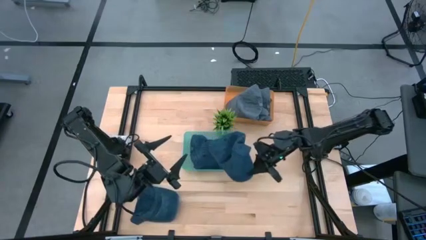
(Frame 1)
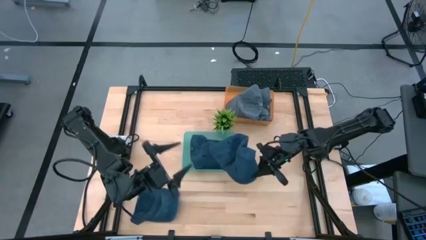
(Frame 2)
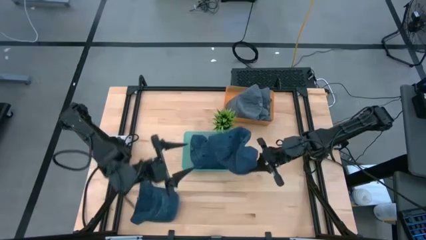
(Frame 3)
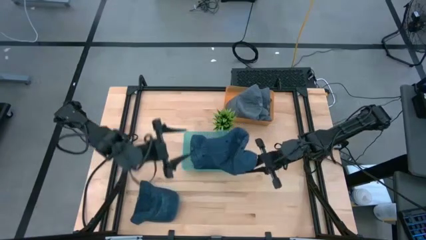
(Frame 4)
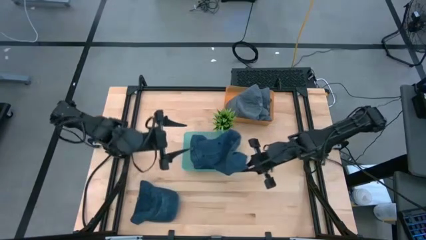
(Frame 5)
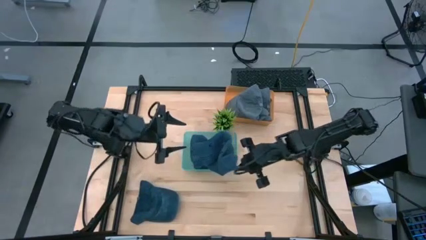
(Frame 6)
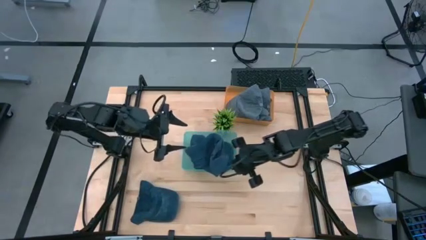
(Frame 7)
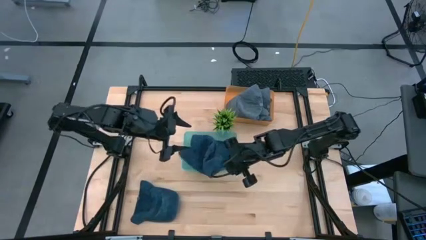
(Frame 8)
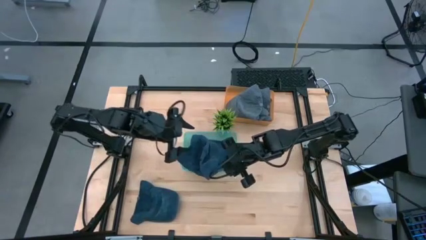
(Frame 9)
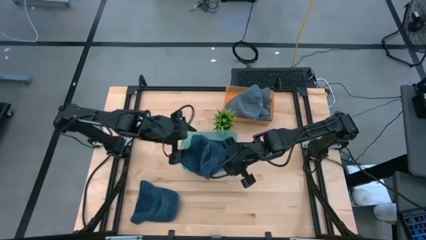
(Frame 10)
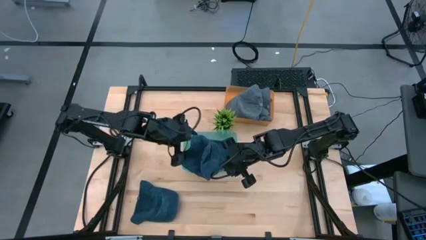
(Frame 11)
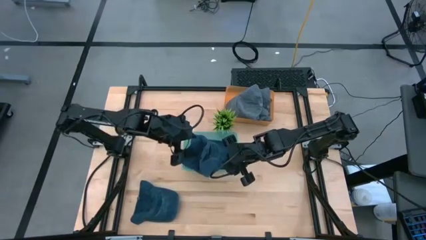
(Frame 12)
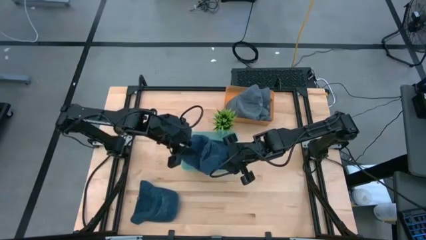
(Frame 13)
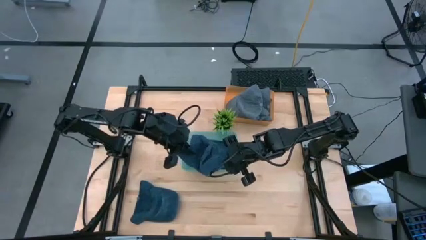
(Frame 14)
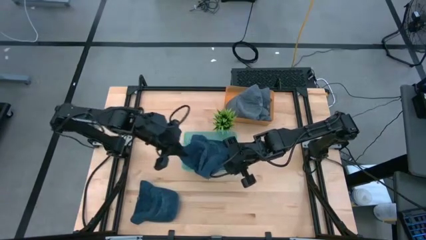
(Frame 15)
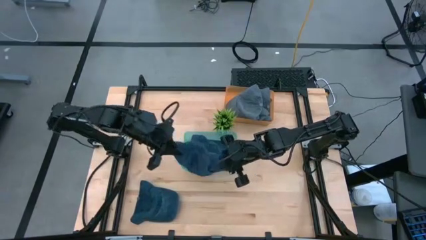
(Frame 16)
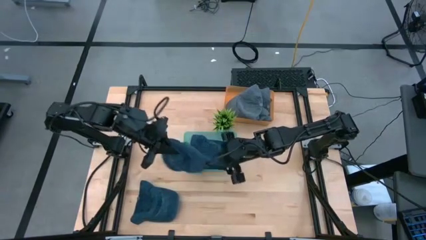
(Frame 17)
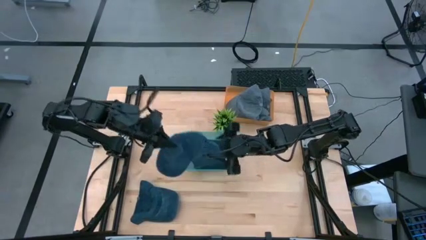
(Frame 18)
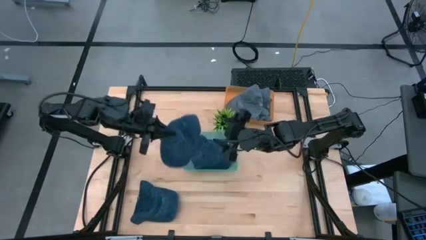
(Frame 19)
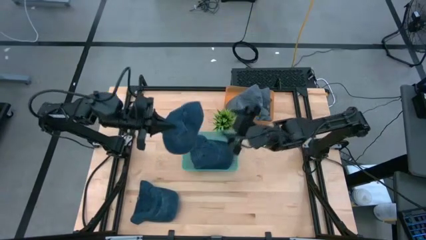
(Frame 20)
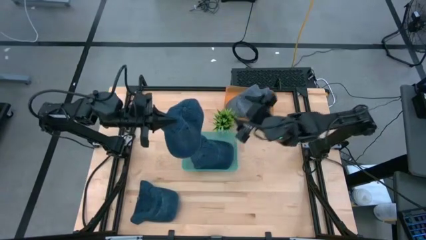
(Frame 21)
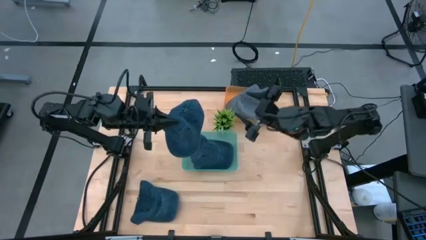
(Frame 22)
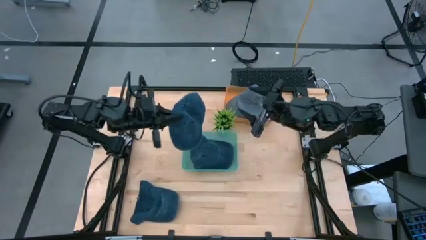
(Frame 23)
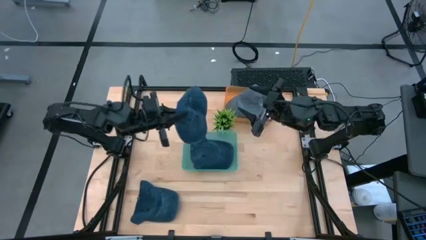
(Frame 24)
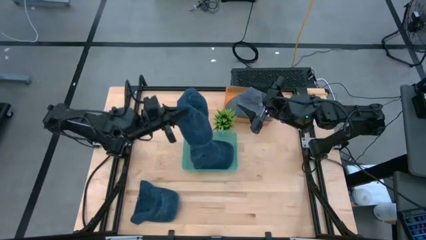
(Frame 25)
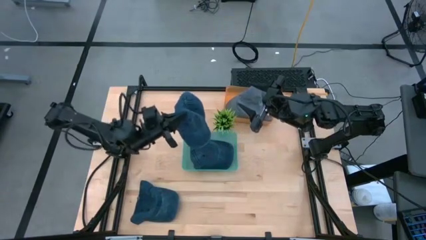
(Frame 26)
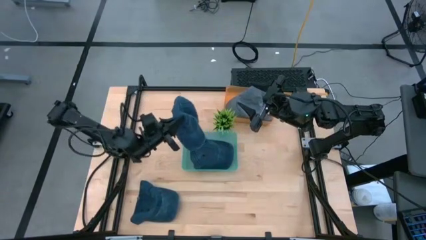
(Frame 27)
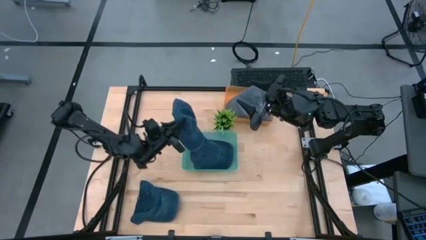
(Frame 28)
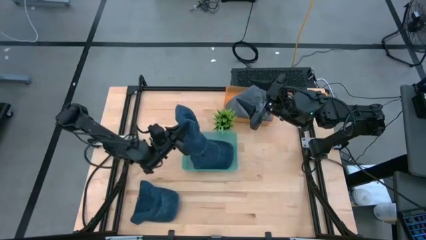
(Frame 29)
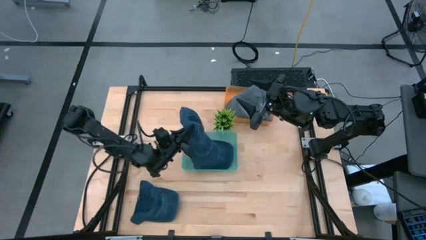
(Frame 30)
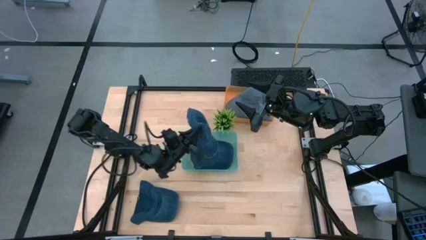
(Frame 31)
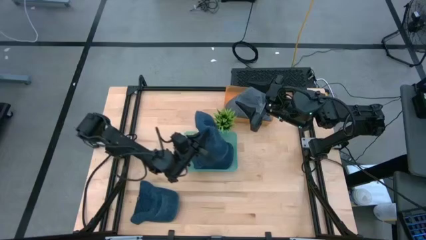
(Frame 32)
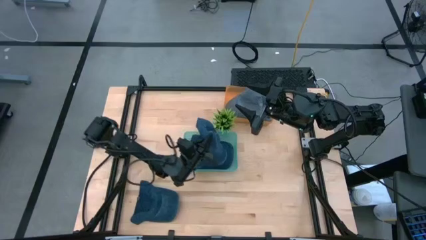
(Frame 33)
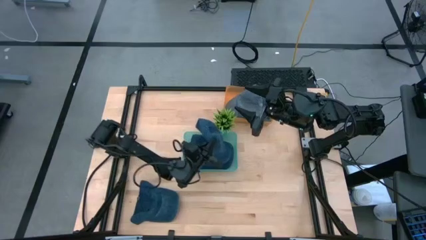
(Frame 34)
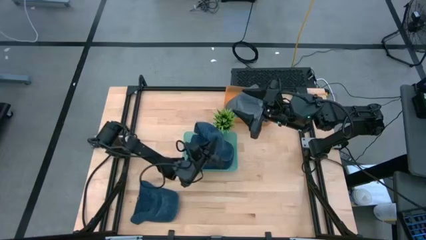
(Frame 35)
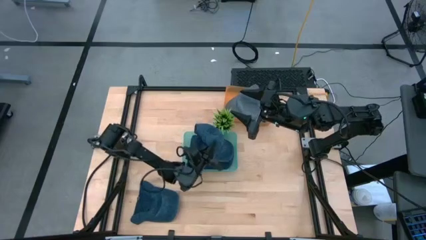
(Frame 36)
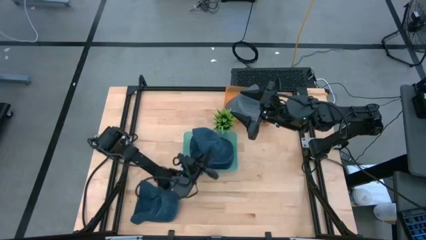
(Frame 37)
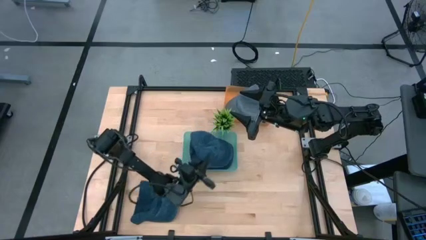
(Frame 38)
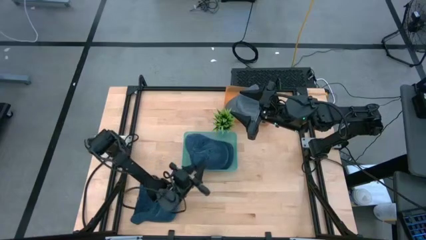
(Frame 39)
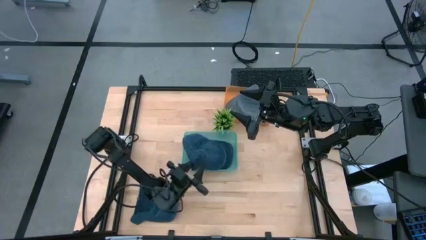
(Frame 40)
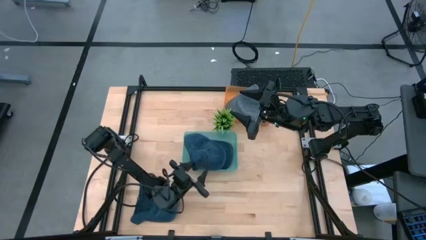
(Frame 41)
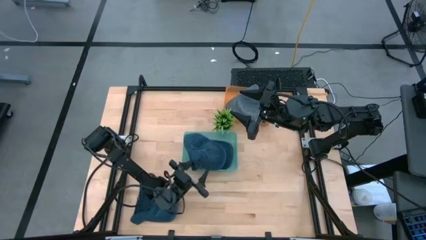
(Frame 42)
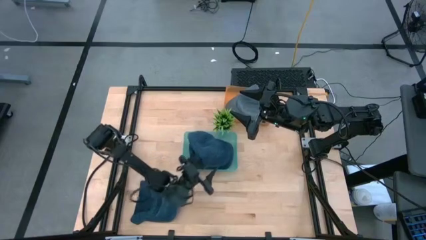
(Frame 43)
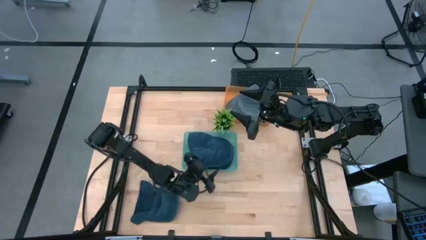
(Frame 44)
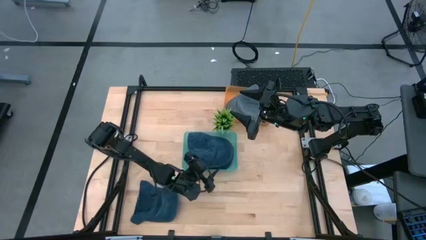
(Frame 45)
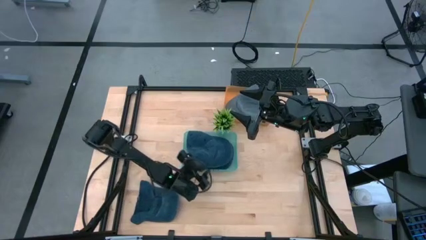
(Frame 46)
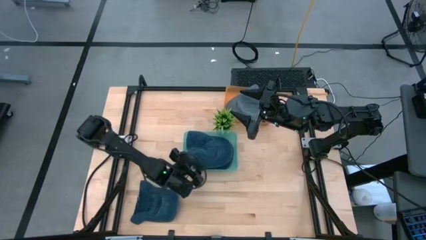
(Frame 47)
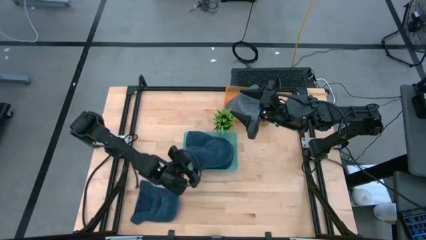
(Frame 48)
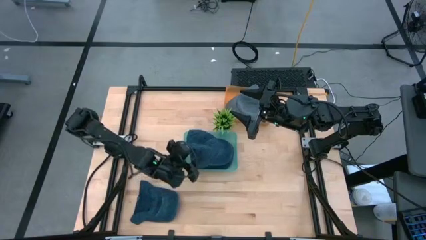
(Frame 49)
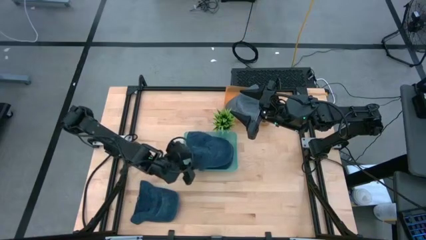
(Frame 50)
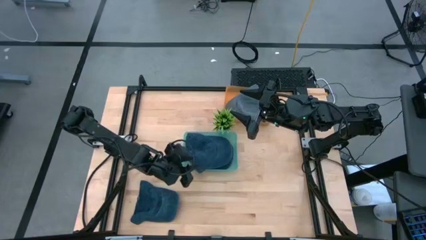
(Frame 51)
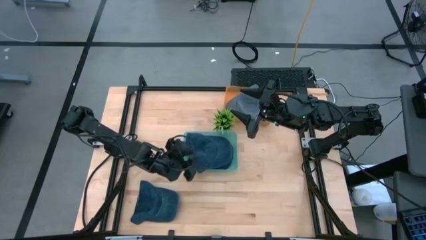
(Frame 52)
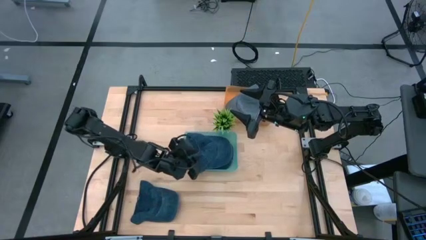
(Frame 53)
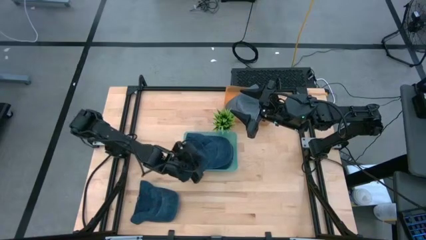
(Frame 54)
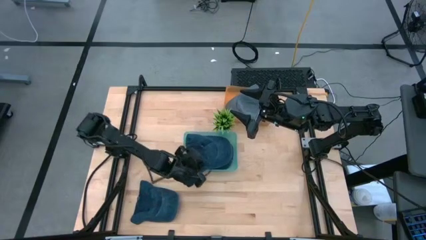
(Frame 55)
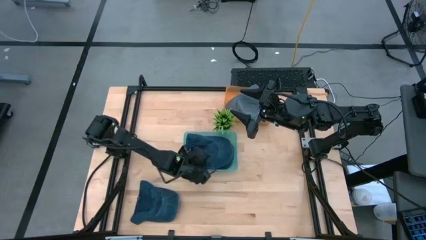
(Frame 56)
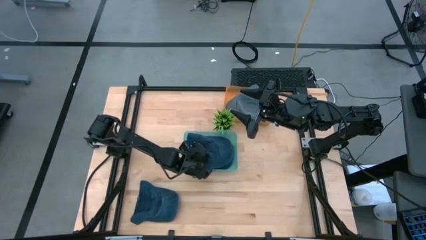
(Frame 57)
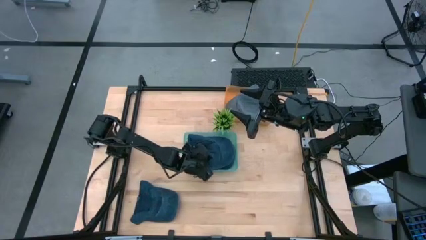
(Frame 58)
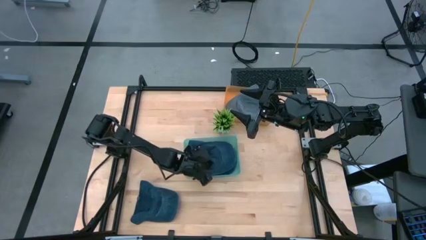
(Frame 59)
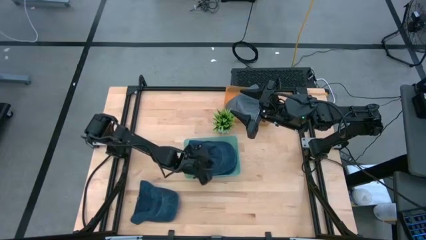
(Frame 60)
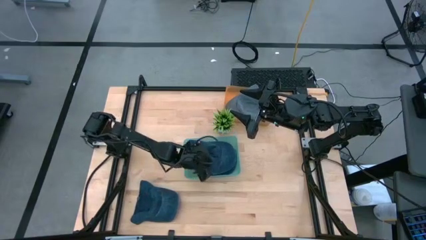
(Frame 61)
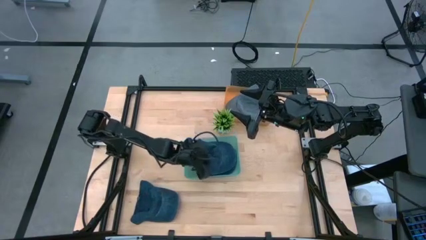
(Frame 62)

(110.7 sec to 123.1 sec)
Task: Pick & Place hat
Put the top blue cap into the green bin

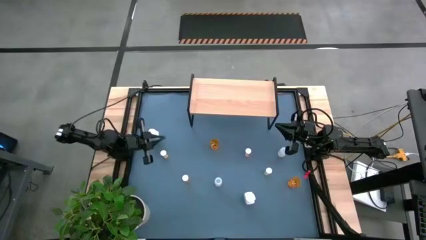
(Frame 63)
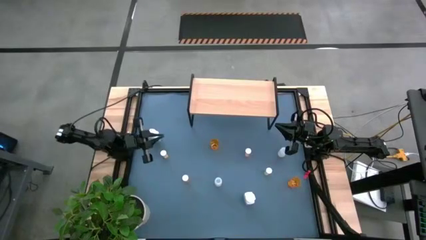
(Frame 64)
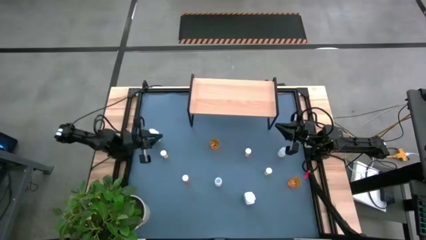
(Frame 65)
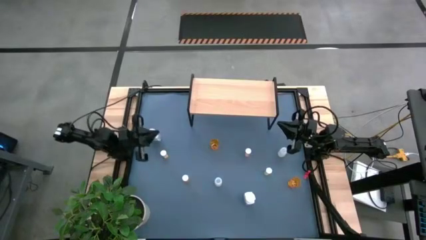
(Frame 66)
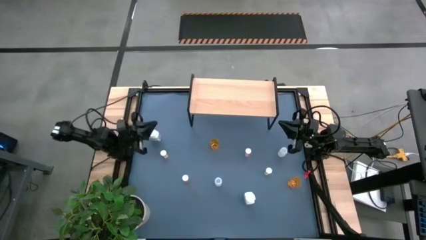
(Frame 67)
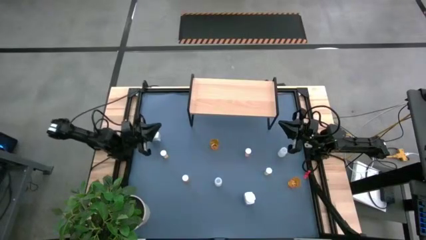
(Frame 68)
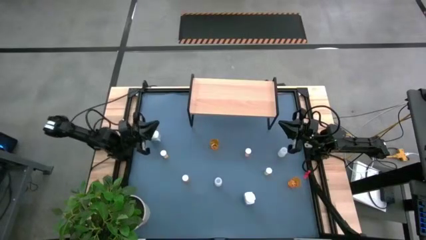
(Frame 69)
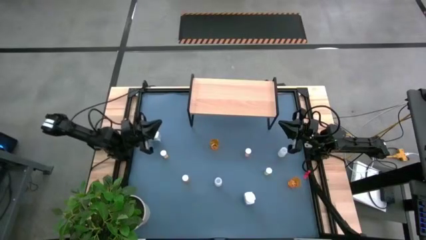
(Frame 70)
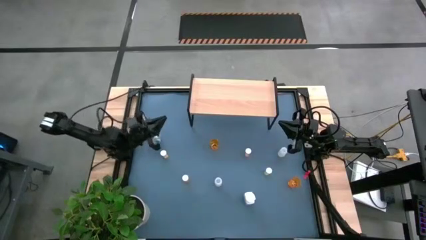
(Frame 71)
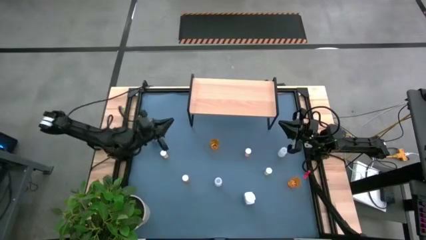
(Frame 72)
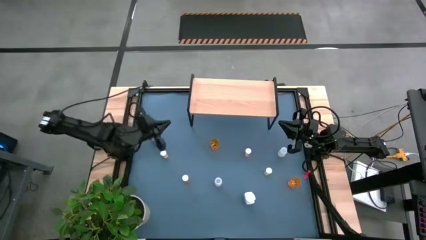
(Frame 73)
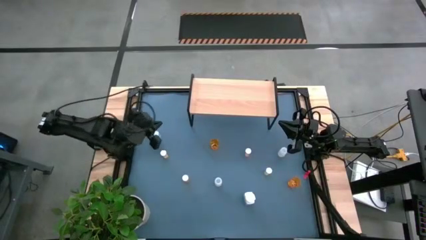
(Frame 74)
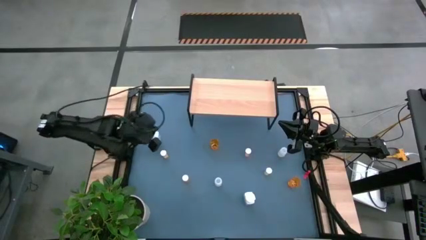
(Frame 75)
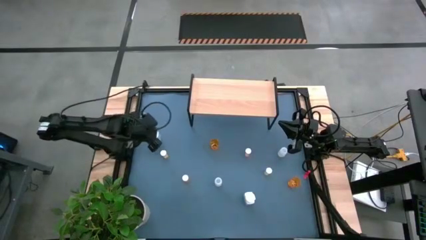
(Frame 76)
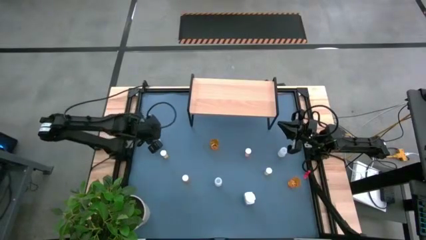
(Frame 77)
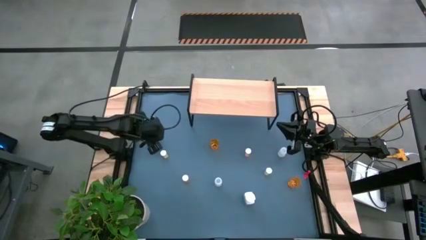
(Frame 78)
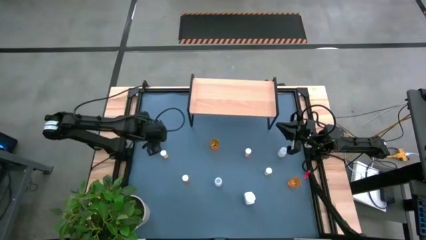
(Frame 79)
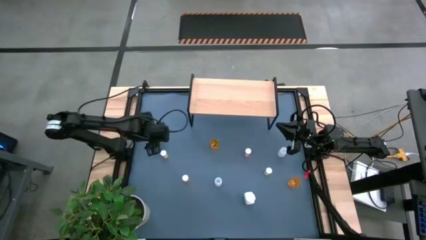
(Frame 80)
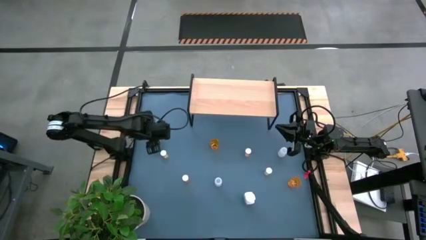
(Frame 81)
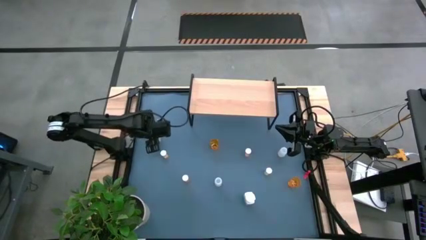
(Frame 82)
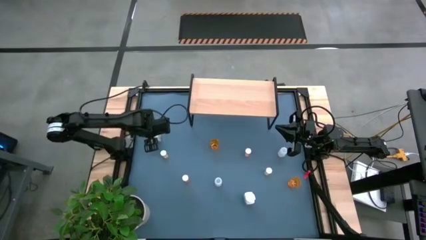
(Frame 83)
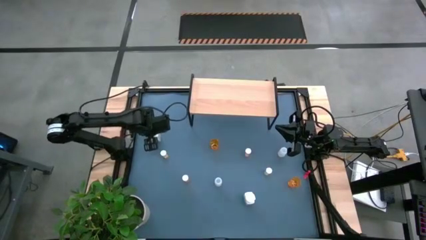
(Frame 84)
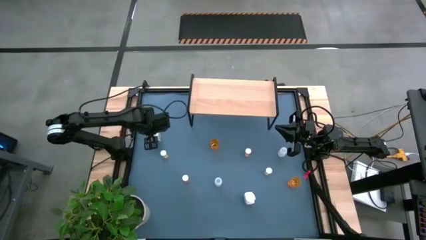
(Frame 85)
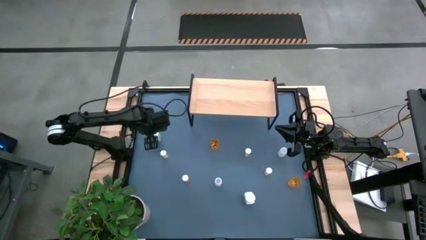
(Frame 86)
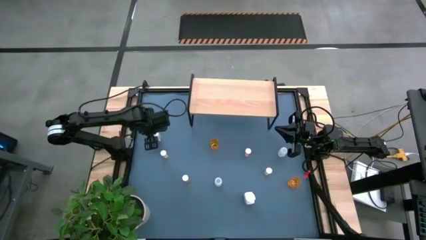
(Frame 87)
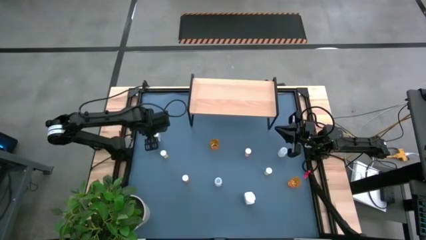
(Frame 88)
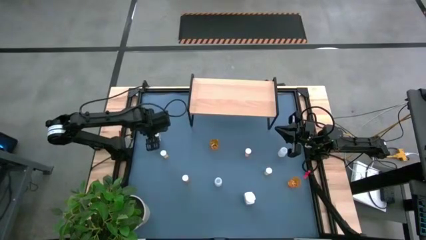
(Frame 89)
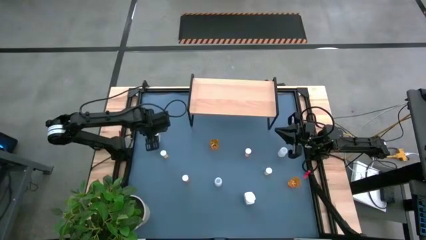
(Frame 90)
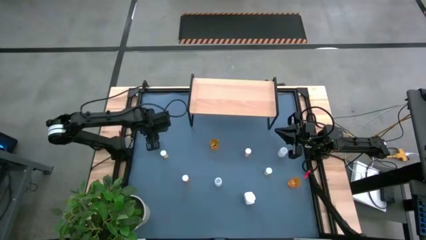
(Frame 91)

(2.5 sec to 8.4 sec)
Task: Pick and place medicine bottles onto shelf by color
Put the left white pill bottle on the shelf
